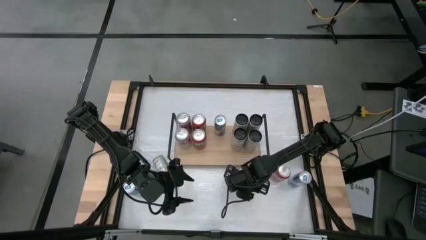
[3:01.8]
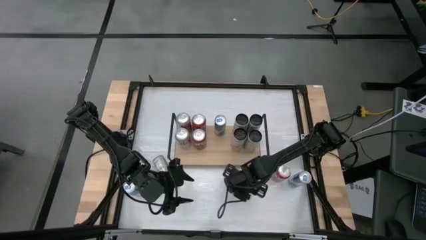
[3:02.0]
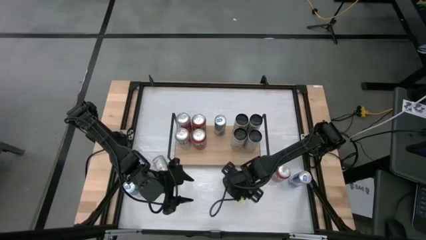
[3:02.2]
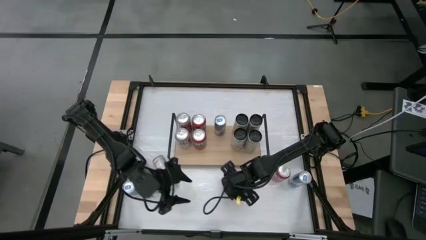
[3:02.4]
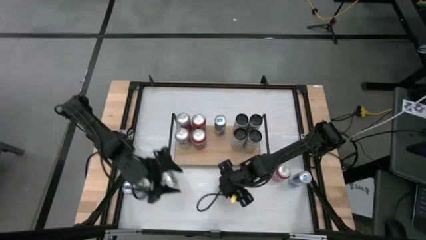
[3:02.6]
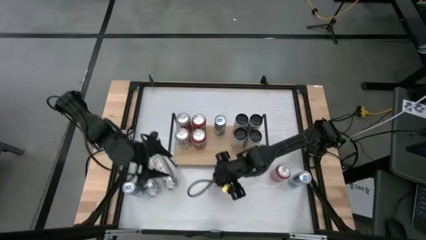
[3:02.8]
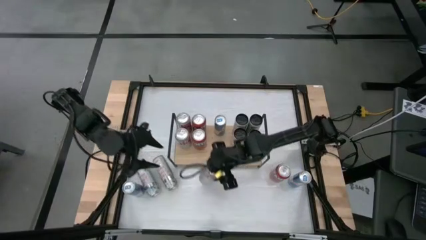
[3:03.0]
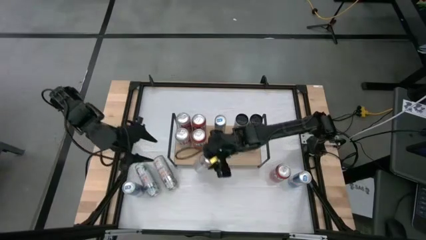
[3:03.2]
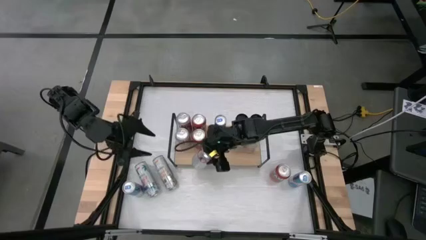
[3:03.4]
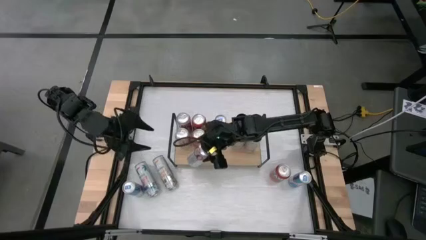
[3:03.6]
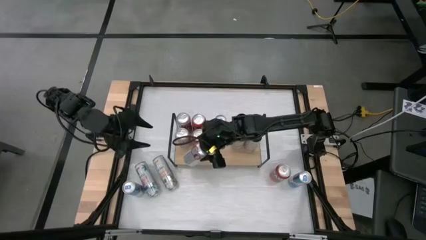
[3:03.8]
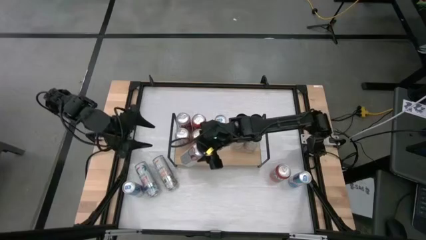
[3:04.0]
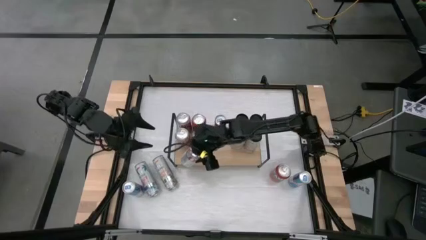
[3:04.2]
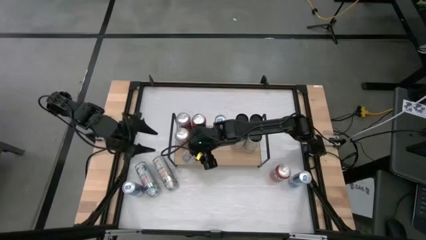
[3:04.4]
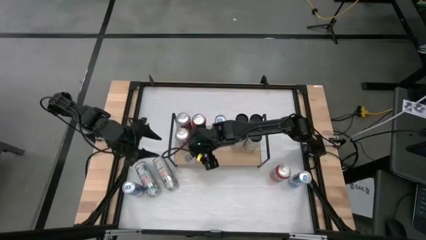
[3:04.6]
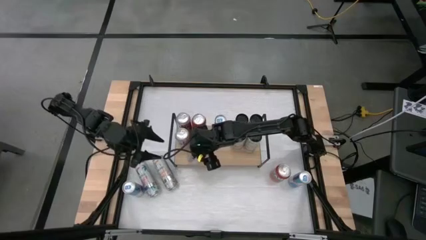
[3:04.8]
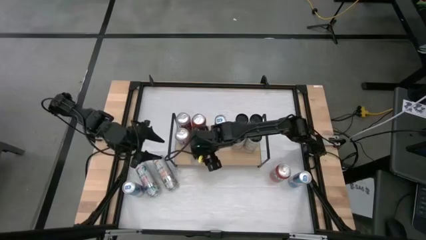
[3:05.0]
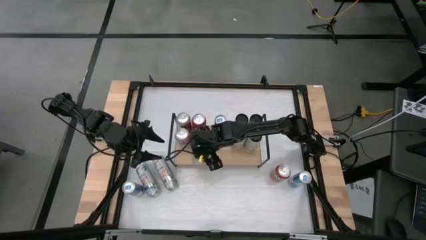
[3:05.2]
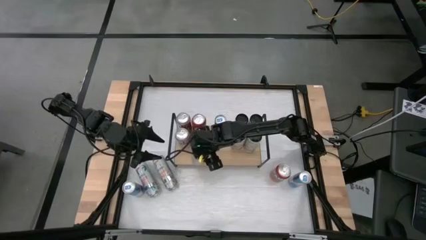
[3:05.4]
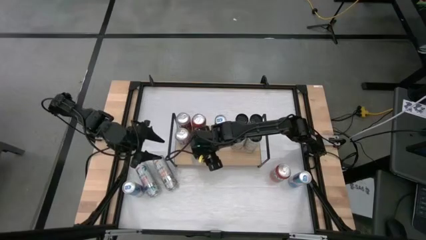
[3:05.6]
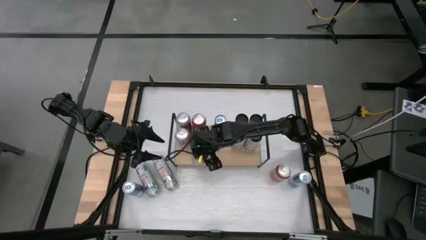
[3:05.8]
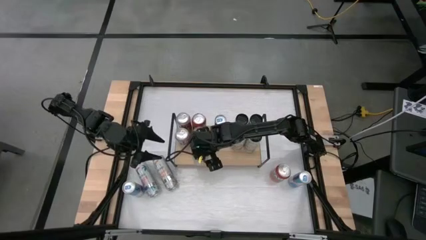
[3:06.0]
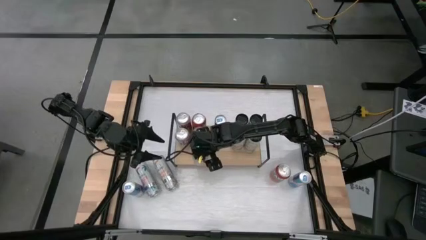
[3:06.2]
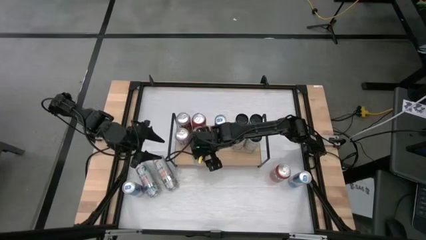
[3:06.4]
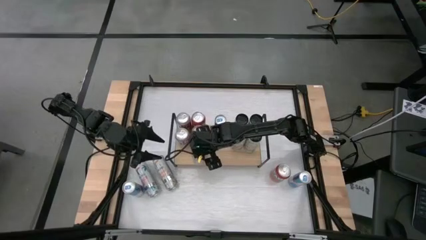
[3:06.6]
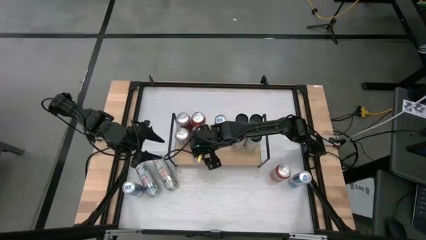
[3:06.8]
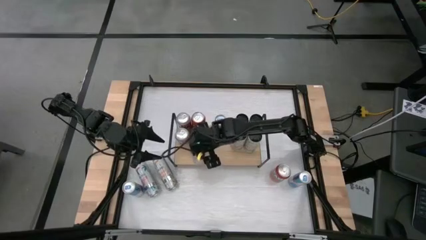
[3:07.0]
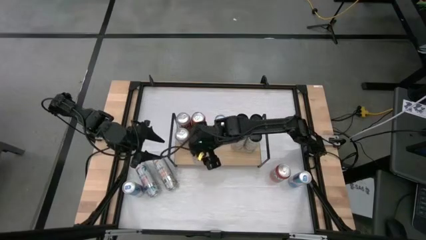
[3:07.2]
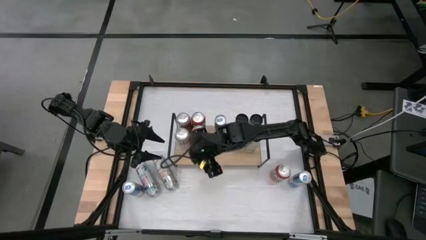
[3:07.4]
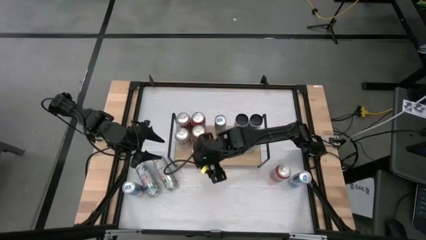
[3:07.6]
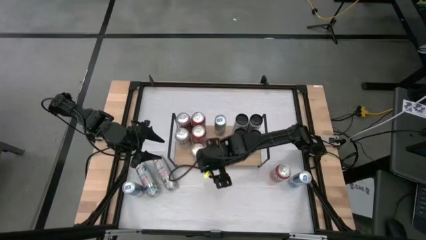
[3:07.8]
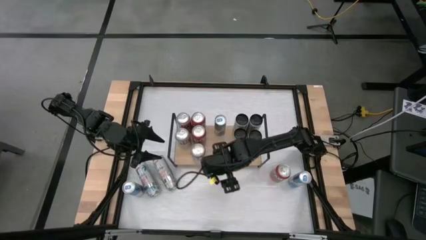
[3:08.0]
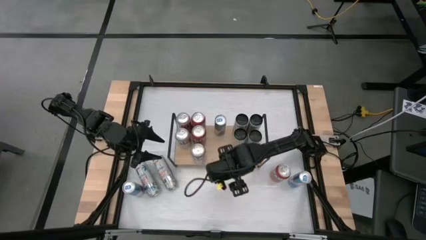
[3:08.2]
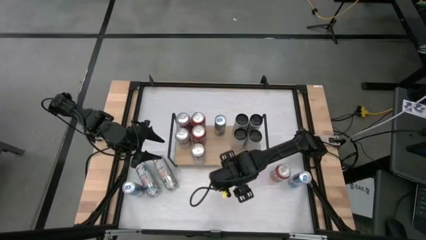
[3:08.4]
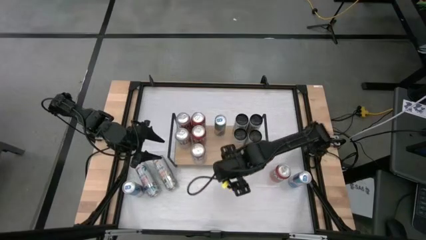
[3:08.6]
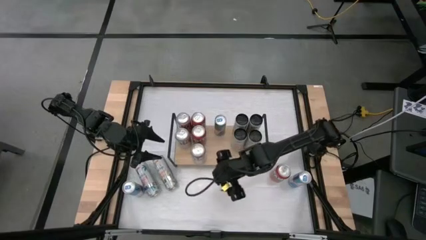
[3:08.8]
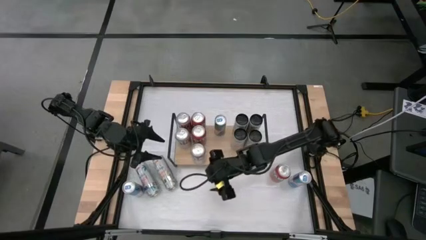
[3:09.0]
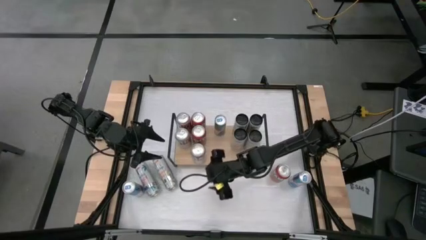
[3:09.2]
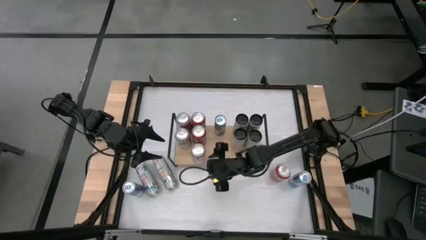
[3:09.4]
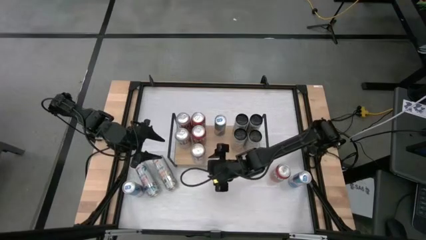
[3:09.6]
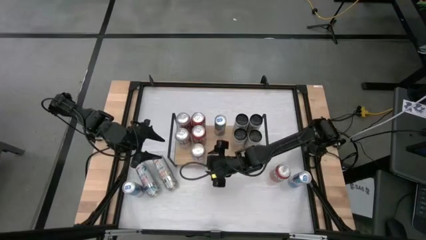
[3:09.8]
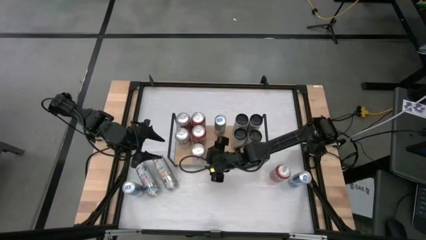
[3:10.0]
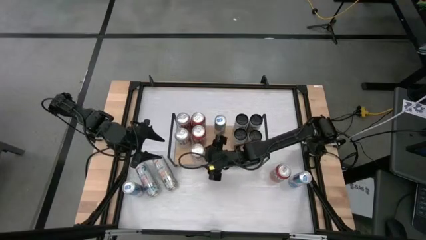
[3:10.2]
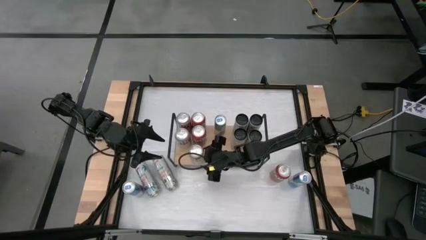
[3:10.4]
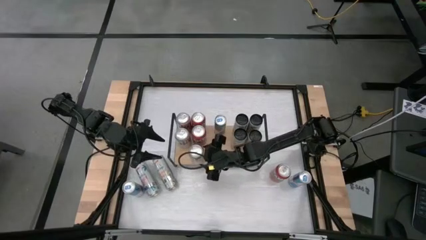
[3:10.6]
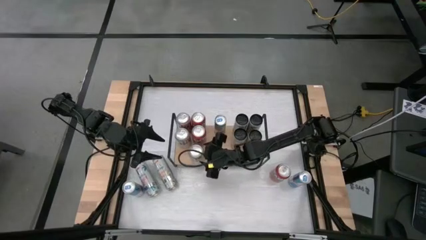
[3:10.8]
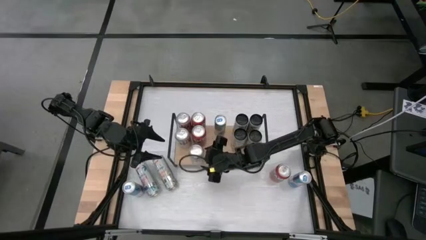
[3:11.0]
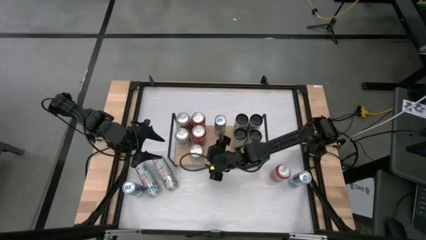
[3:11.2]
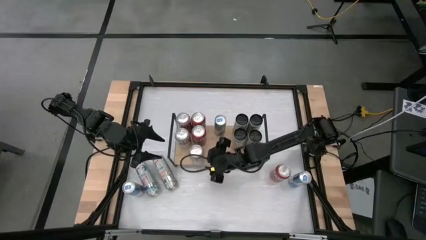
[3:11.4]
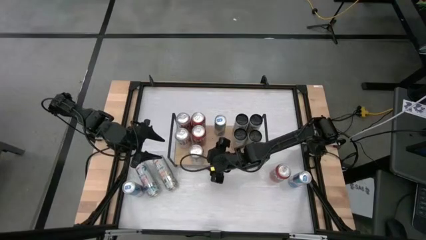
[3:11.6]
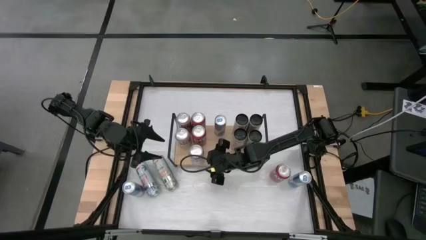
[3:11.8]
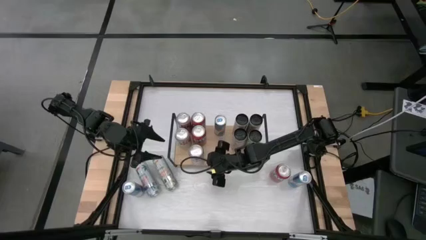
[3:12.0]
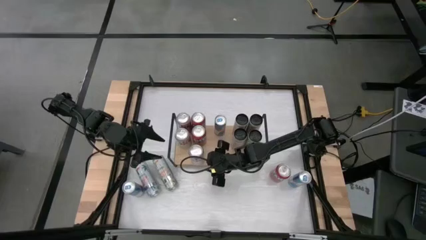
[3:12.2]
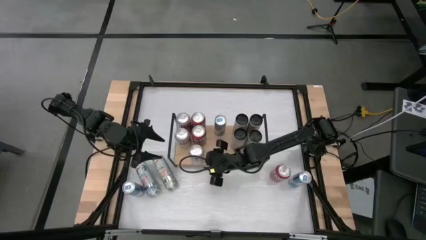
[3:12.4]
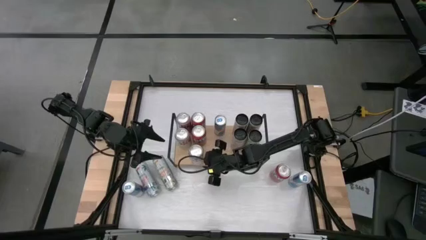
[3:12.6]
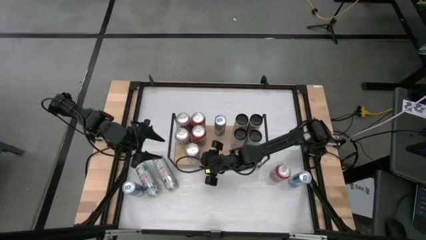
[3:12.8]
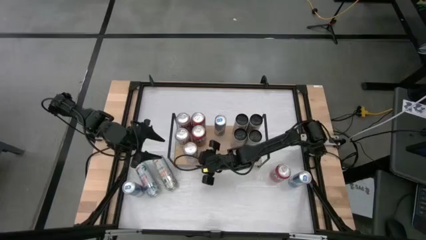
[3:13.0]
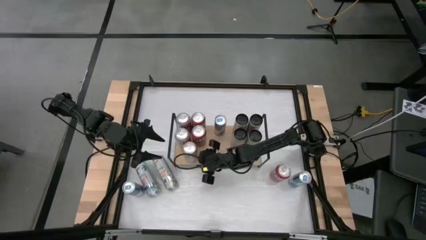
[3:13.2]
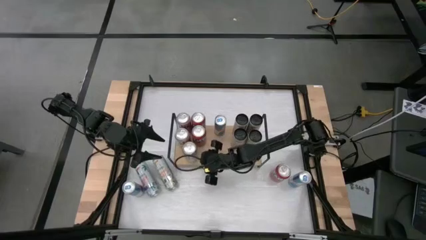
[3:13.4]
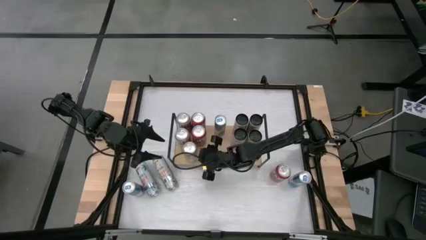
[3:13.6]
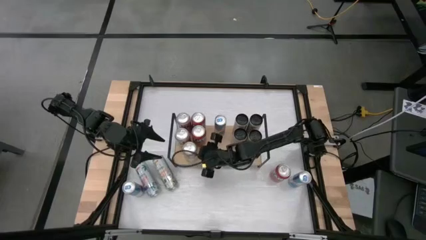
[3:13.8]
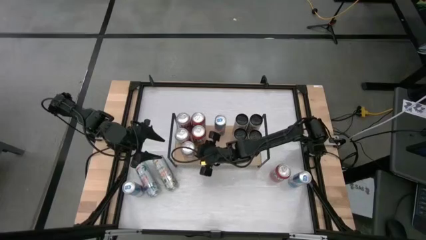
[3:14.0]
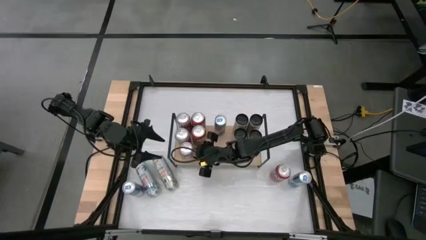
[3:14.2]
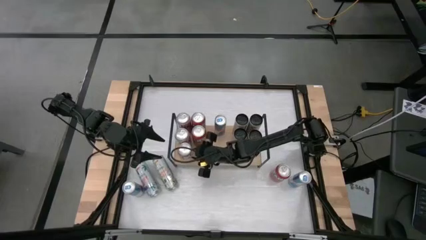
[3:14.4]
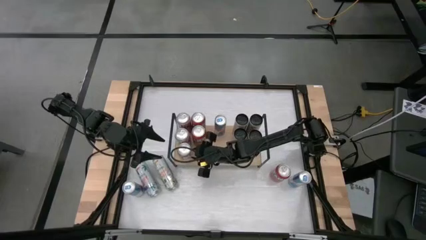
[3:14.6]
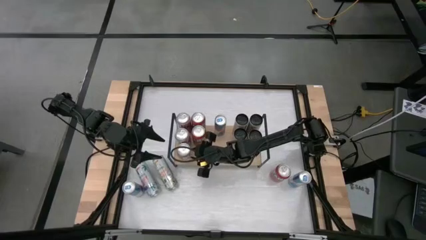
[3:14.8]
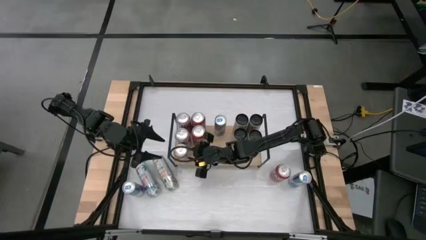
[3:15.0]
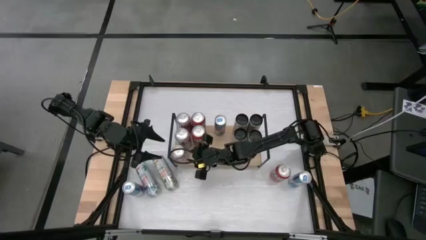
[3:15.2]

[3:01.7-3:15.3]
Task: Place canned beverage on shelf
Put the silver-red soda can on the shelf aligned with the other silver-red soda can
